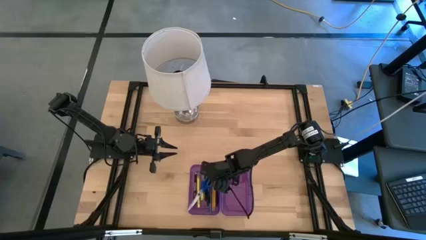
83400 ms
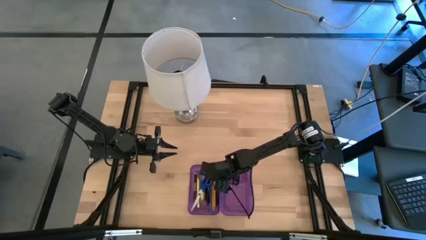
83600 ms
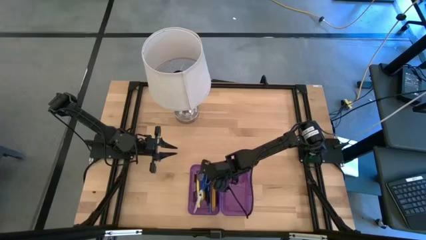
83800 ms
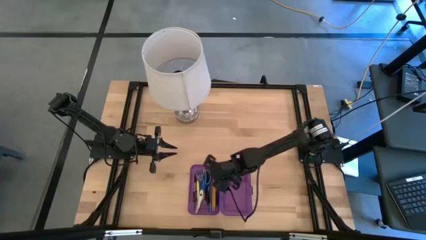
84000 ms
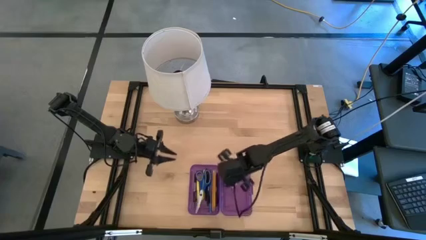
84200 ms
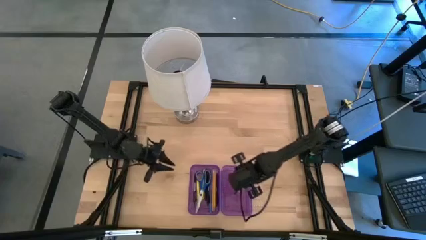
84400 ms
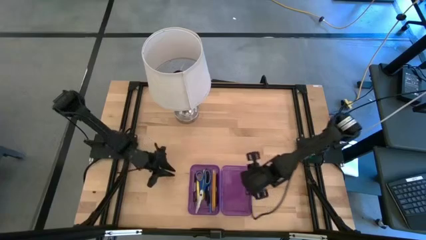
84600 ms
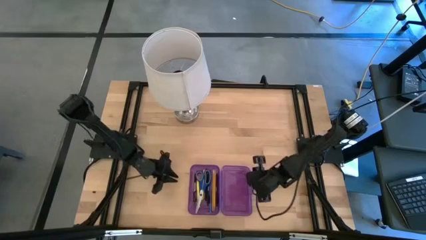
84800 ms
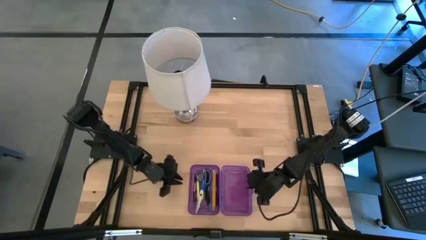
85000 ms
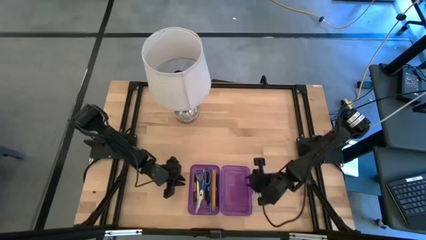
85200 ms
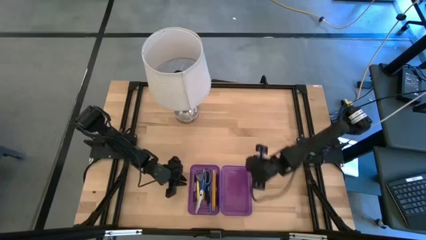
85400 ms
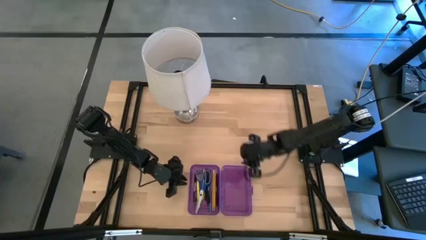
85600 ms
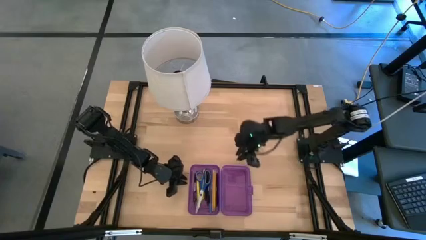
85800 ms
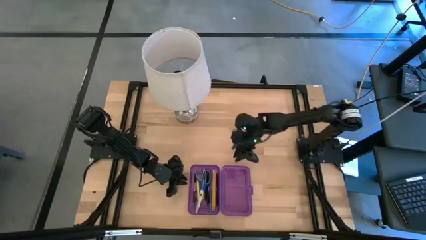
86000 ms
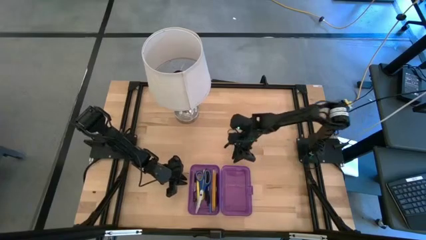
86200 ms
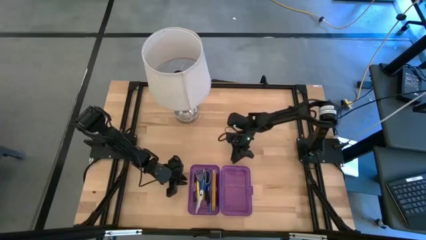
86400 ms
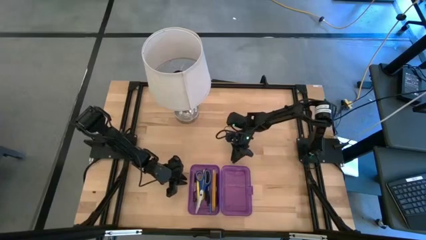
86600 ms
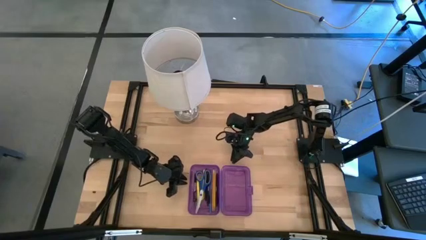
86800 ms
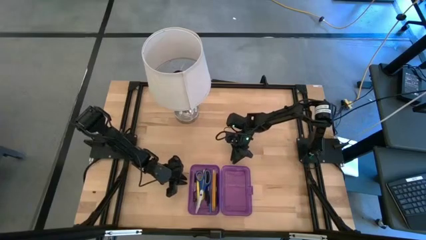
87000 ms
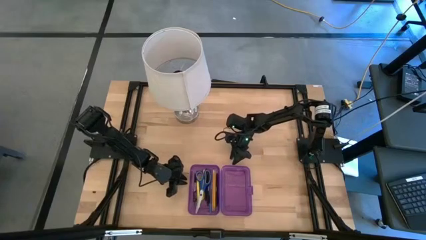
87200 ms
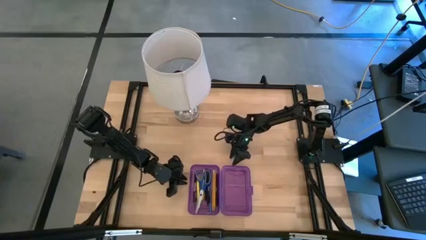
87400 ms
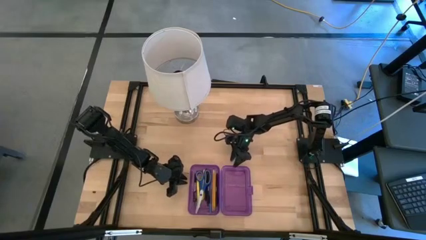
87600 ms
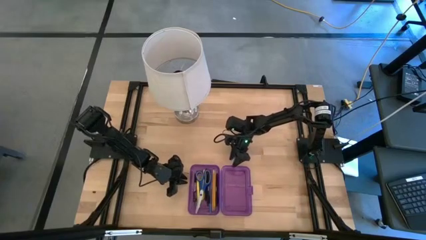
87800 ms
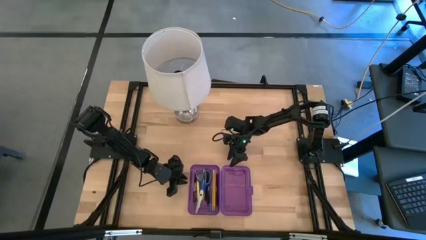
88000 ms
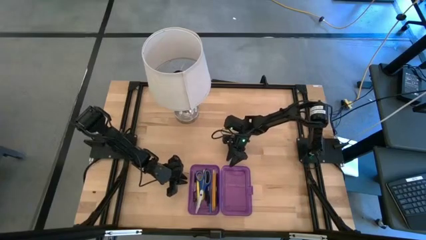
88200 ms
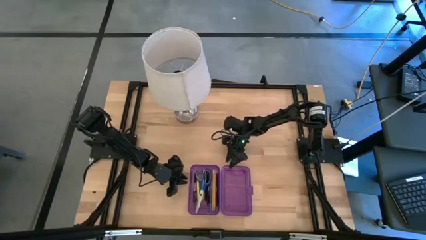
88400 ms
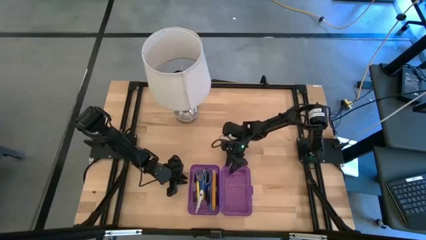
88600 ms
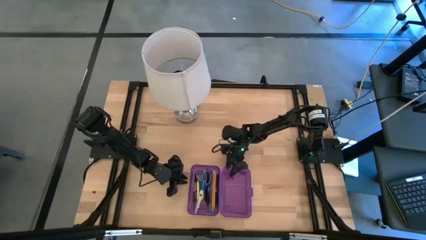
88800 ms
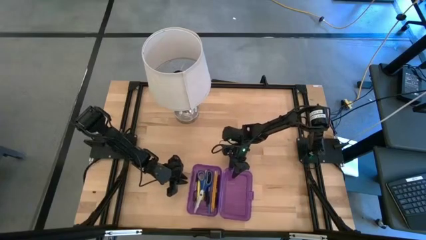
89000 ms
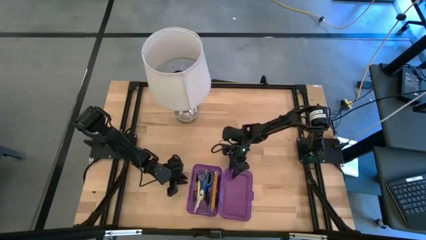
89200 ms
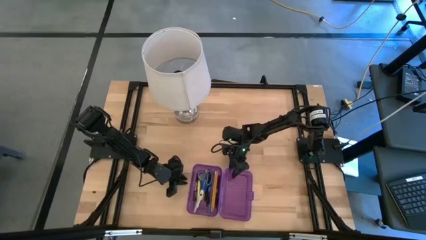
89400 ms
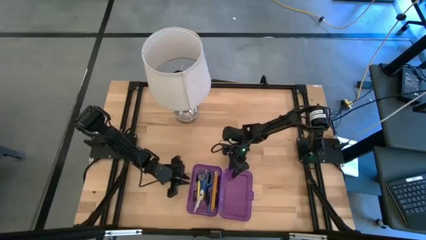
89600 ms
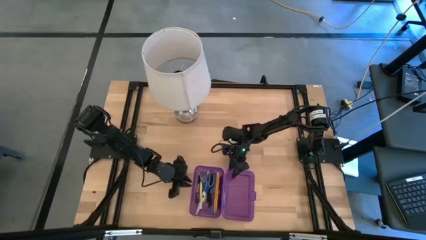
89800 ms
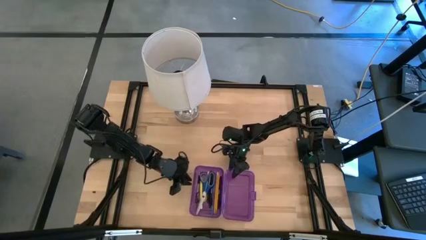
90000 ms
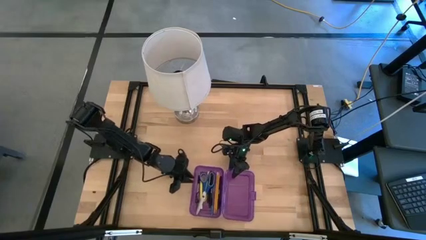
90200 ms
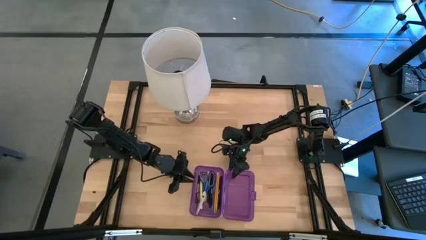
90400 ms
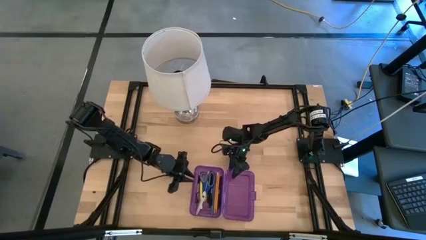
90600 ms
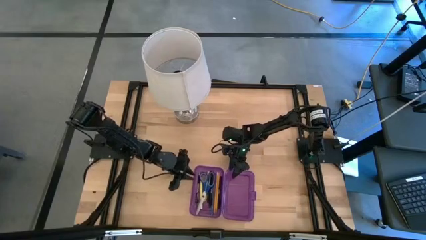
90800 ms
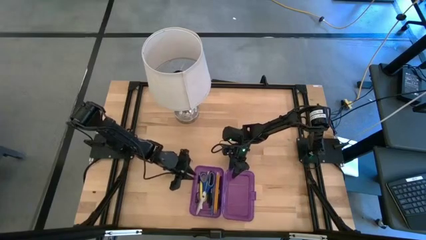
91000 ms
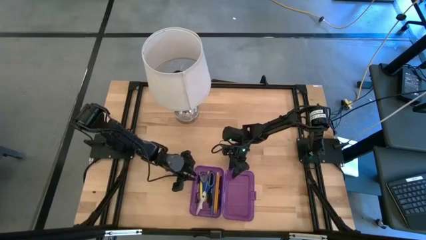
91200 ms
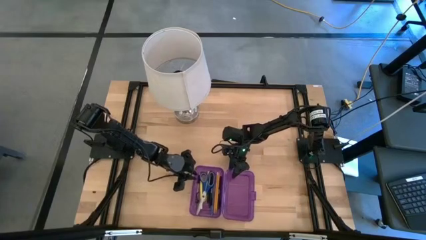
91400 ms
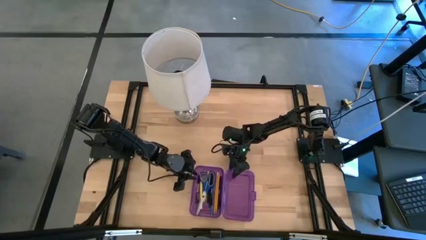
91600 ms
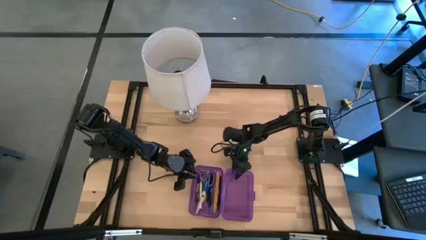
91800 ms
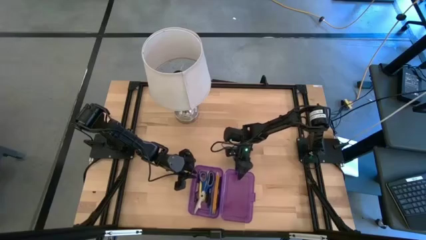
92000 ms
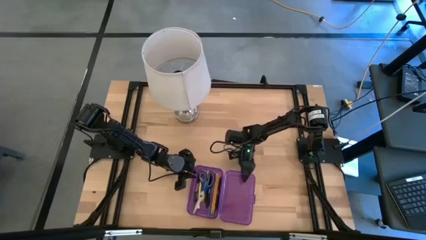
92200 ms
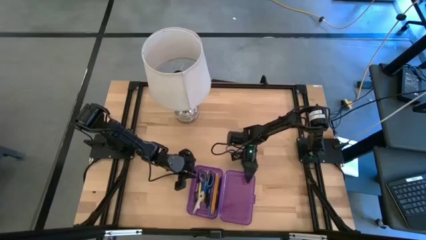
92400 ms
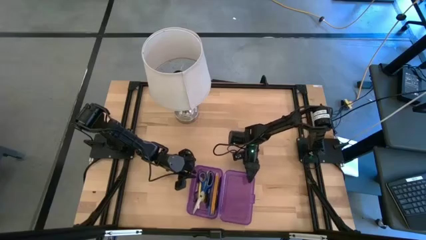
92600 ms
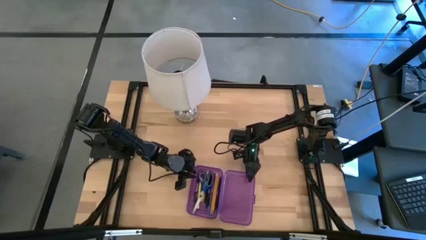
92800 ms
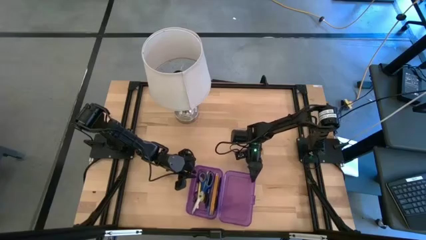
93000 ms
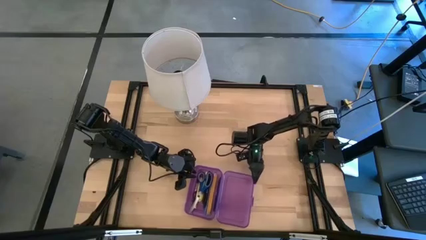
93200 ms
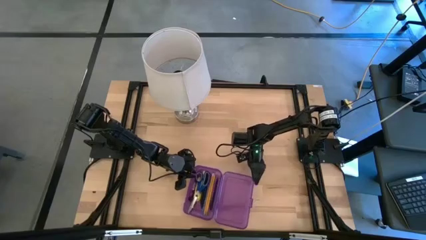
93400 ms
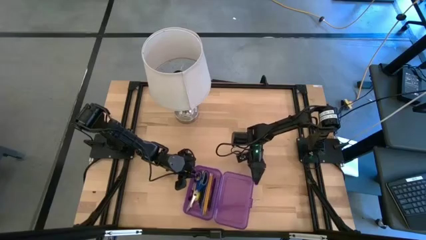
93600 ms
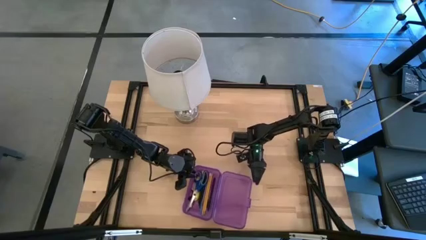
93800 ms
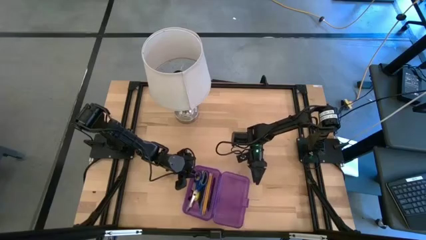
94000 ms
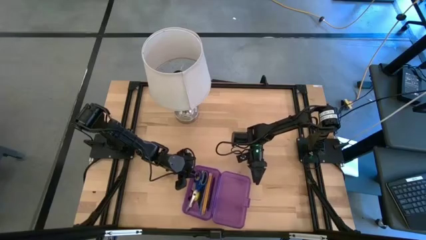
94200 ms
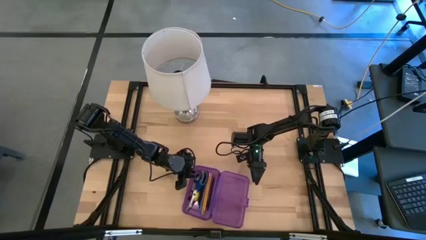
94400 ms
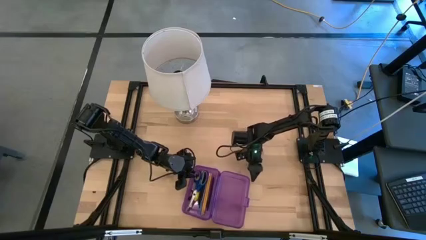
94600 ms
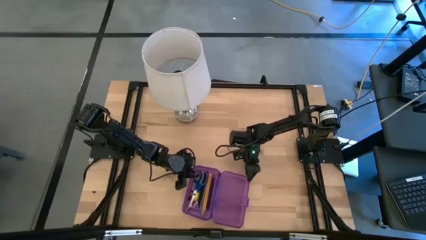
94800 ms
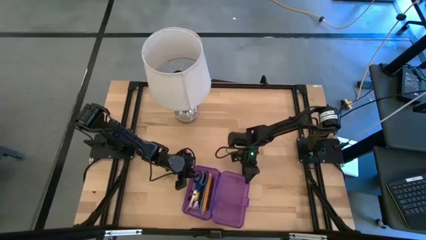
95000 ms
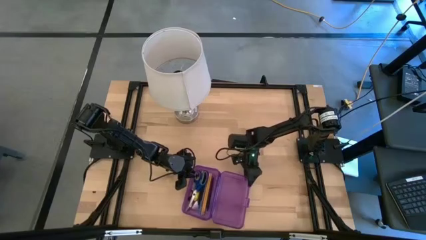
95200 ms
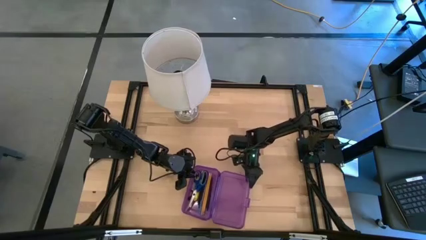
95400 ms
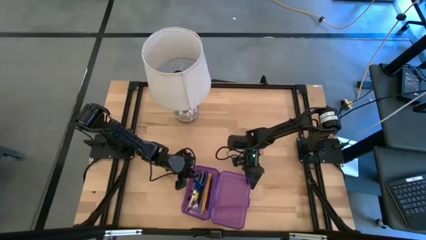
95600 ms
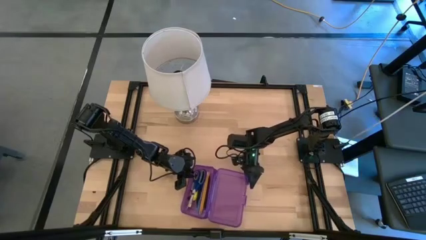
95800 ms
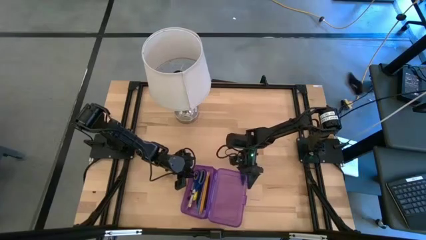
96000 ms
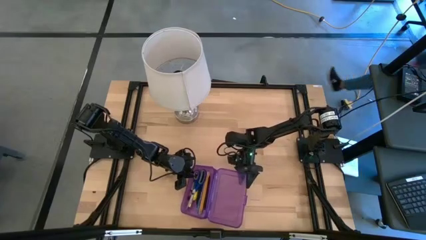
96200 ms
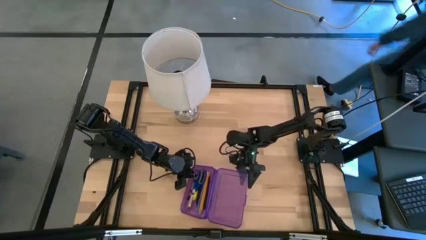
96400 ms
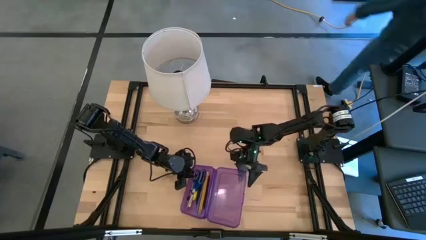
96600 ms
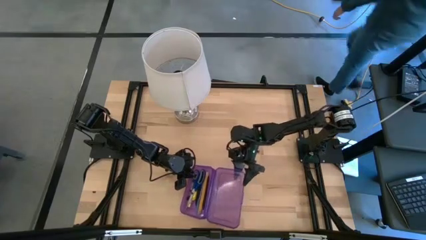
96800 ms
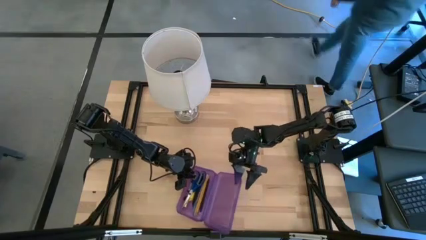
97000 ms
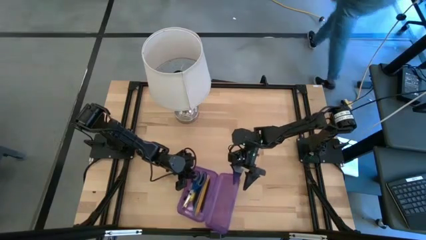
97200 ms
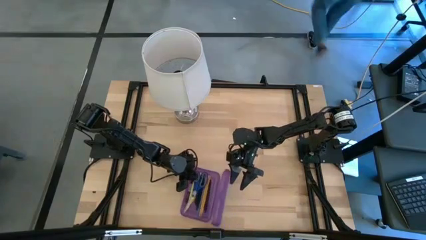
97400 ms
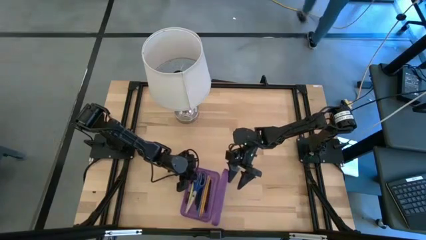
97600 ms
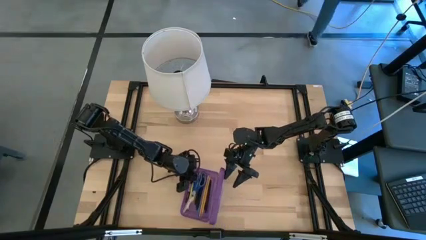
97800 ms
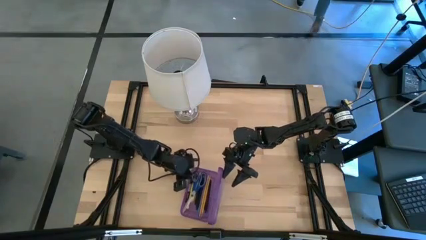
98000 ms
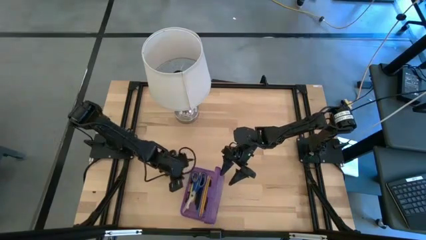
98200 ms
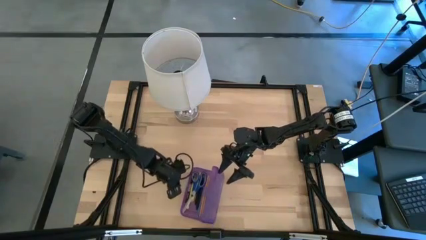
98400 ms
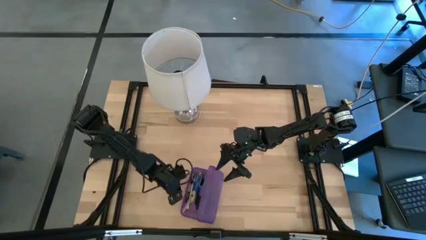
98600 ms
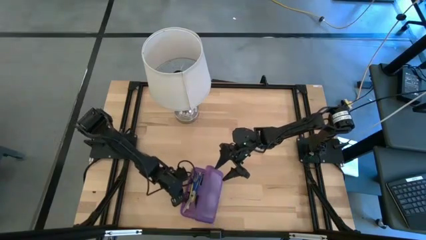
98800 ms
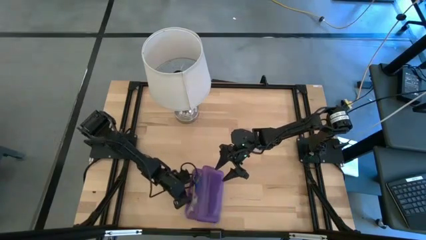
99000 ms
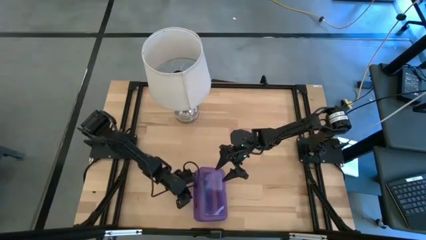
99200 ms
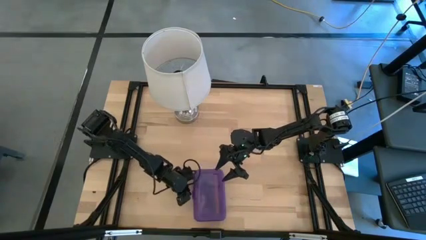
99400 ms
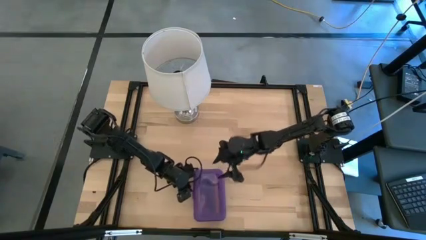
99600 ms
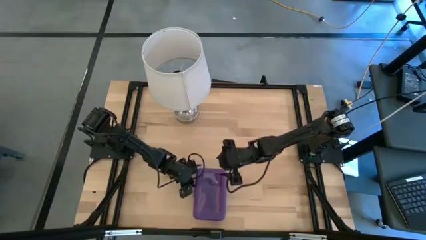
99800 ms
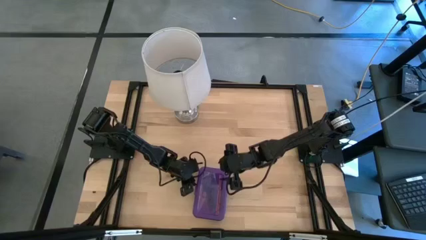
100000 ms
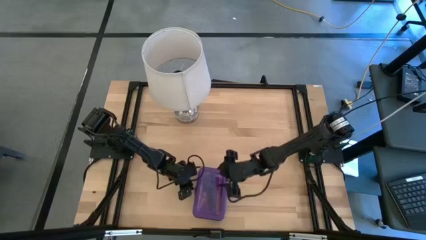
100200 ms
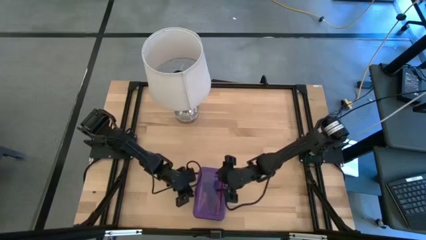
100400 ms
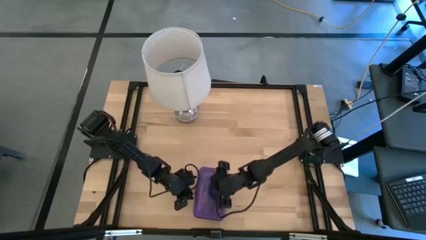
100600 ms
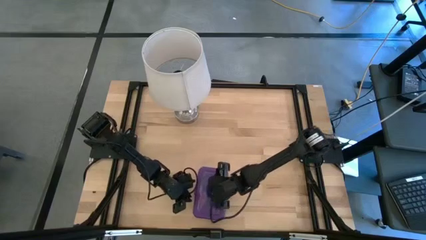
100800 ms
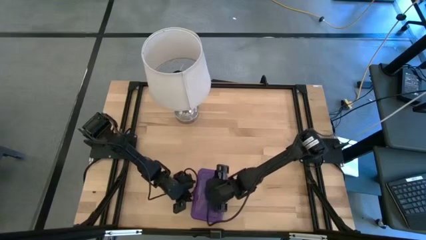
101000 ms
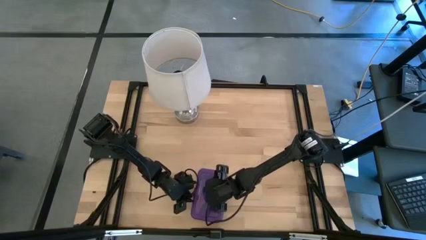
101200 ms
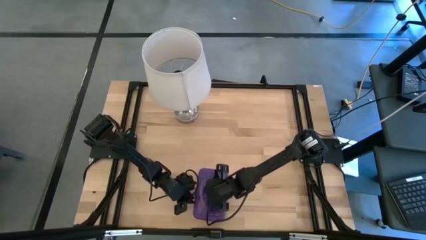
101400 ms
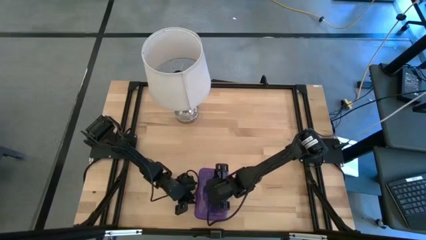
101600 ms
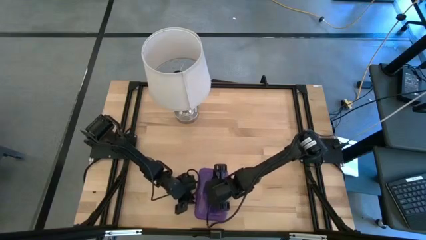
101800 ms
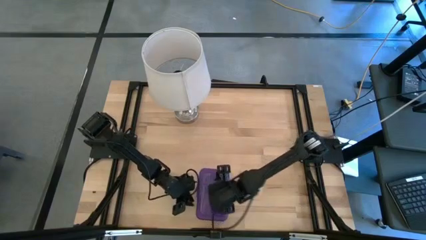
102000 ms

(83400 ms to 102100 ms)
Task: Pick & place school supplies into a supply box
Close the violet supply box
